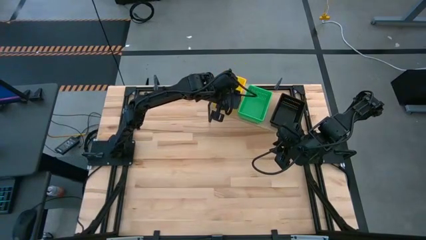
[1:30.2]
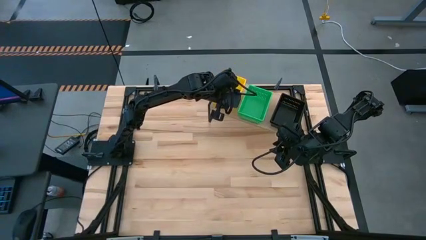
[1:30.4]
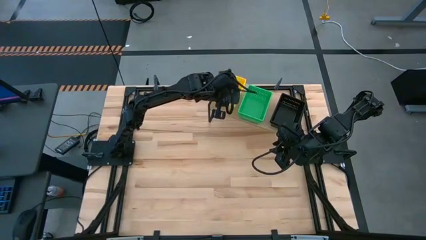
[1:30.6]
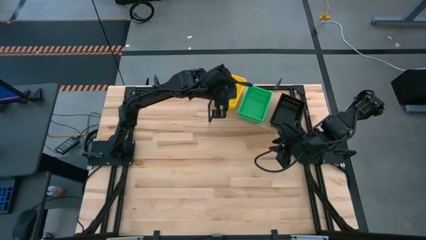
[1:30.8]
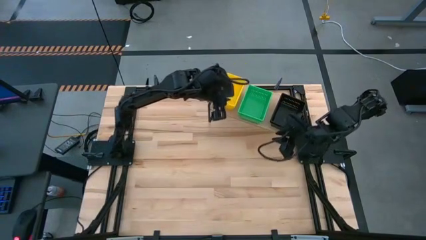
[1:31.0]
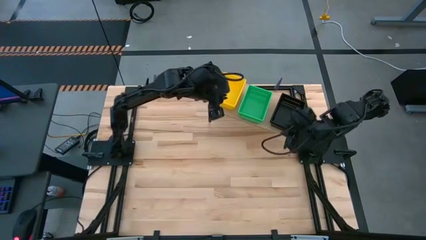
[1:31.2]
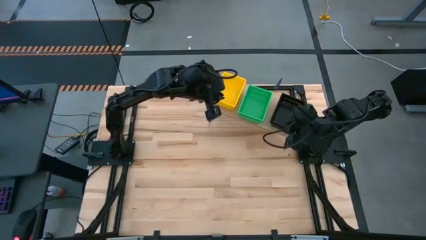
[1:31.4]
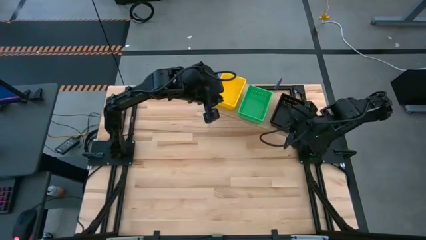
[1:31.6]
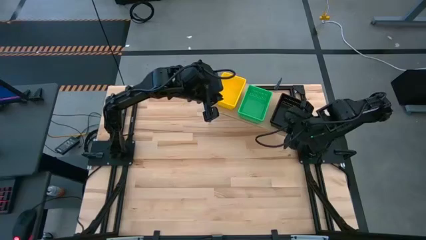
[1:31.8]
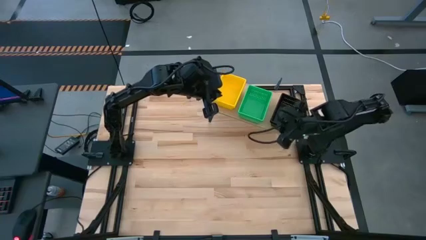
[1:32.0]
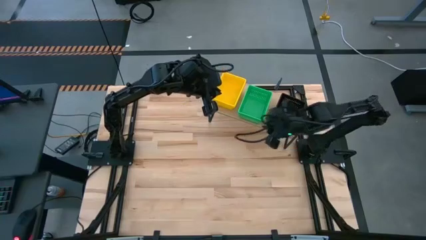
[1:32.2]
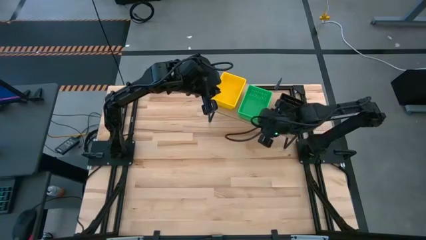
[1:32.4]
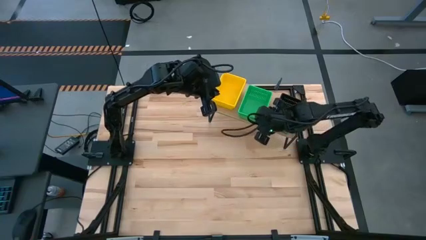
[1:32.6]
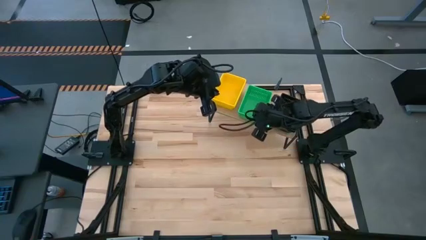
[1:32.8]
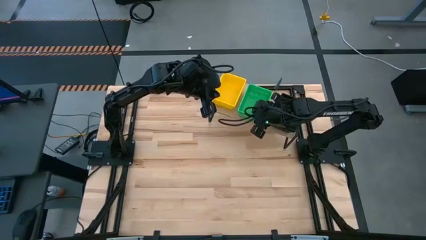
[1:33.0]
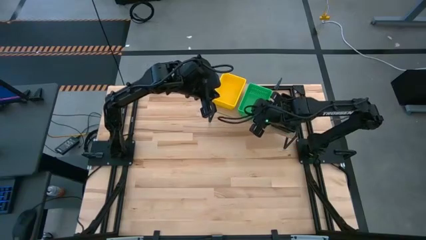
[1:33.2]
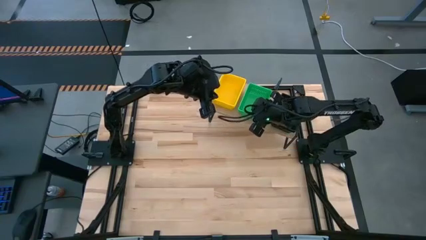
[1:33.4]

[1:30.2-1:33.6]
Task: Stack baskets on shelf by color
Adjust the green bin

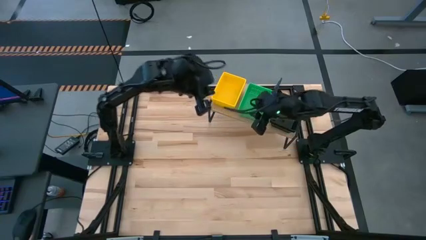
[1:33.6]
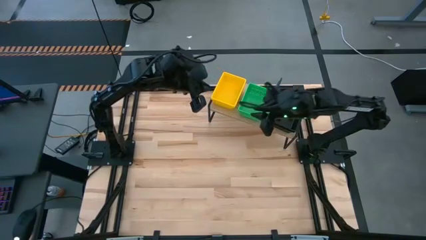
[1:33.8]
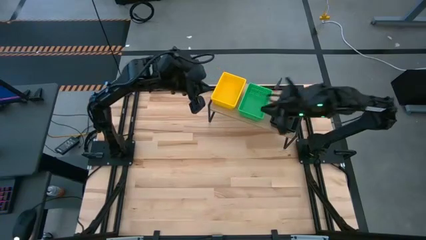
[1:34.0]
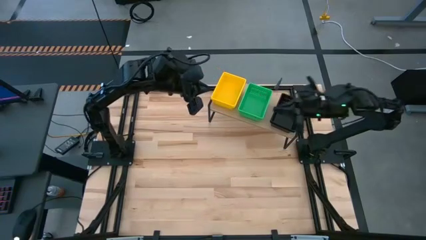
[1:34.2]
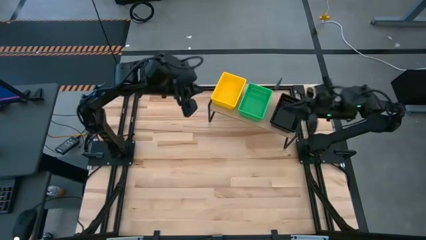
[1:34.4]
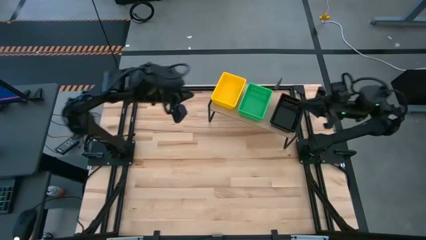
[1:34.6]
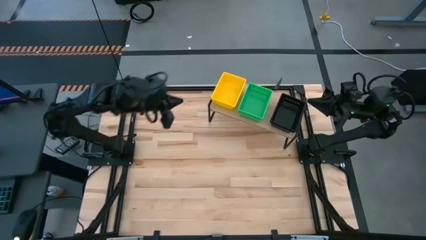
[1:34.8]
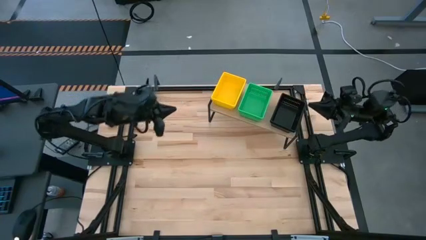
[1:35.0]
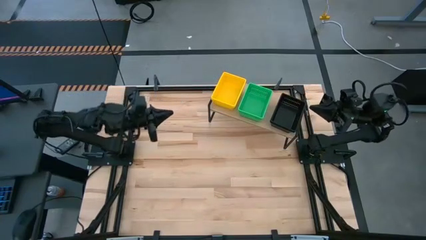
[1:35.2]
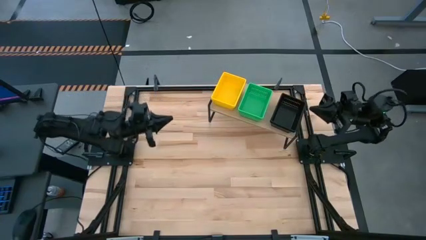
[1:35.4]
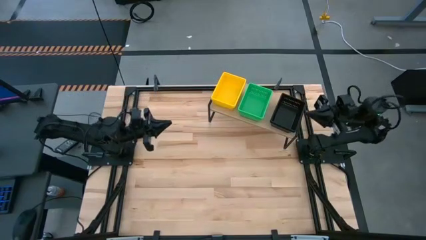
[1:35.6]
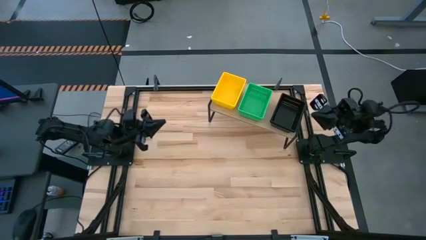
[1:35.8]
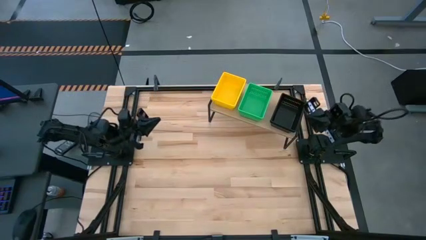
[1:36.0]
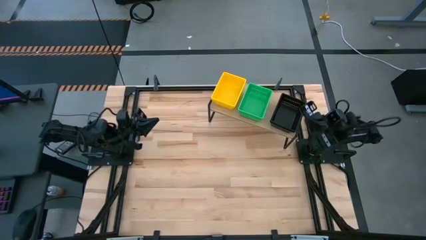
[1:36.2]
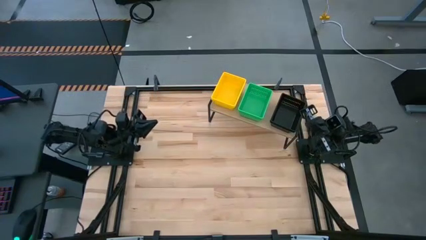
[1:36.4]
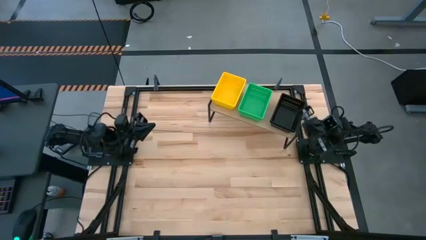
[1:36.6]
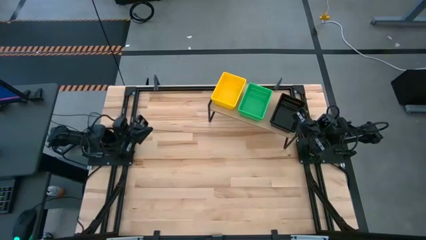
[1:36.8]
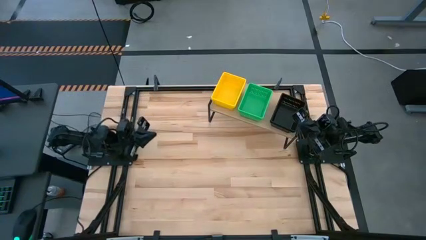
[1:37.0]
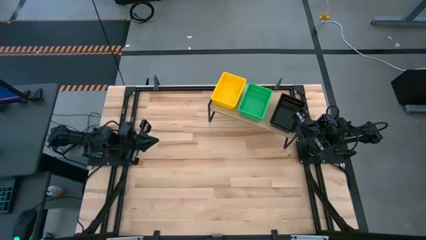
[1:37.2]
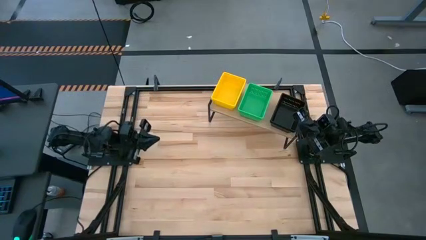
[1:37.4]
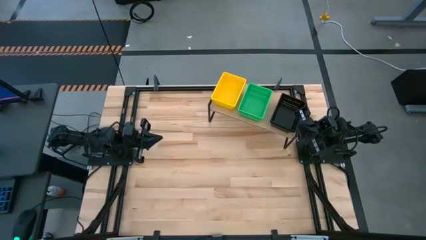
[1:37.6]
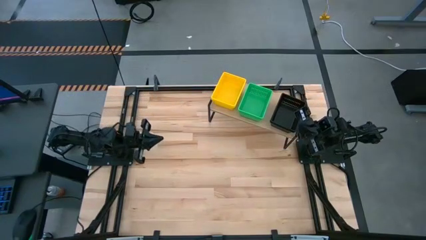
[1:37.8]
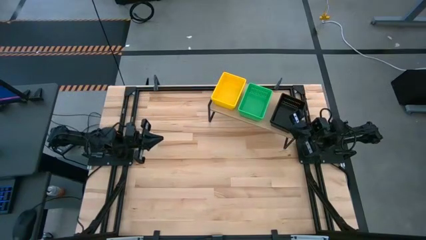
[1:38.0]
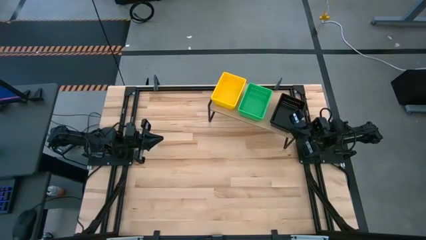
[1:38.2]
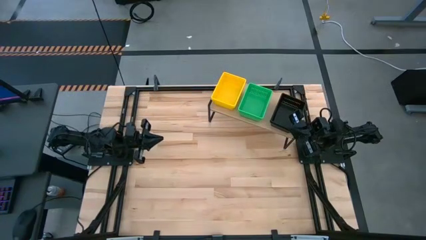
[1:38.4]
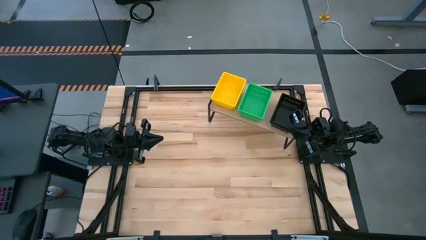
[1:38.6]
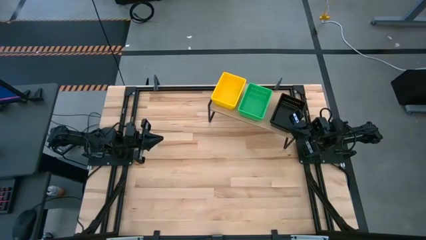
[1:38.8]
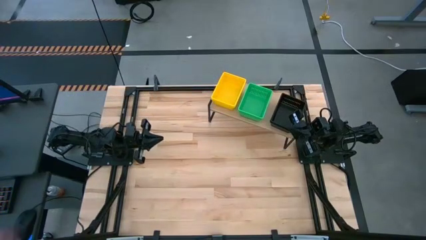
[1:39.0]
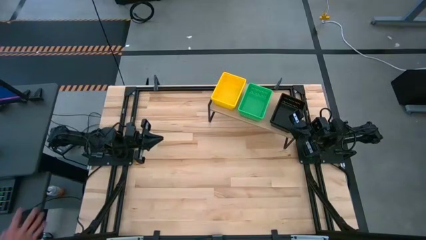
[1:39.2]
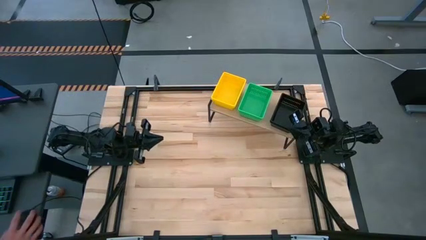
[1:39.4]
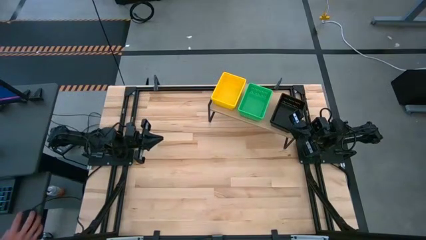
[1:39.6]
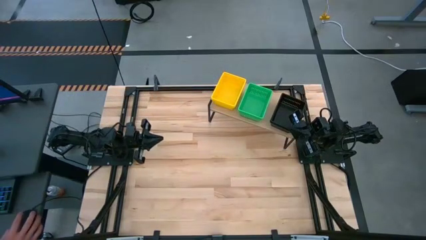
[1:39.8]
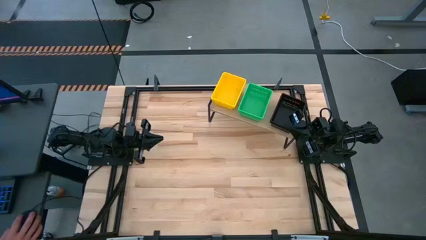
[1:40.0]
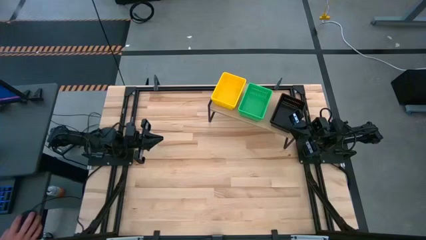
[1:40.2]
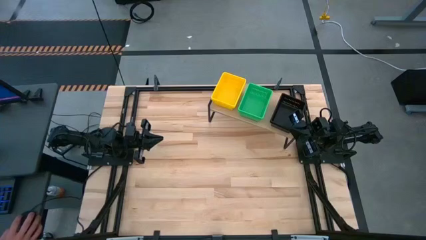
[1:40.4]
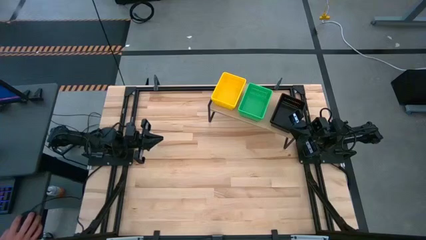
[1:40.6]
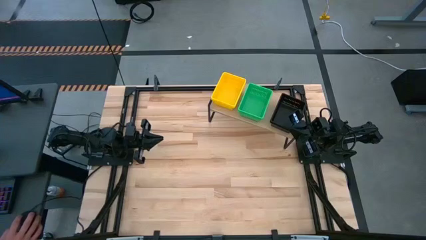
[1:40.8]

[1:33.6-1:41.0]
Return to Home Position
